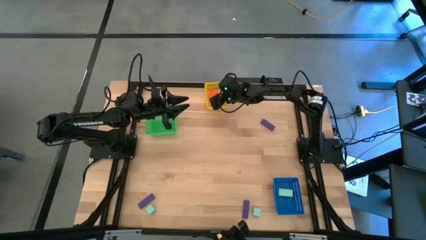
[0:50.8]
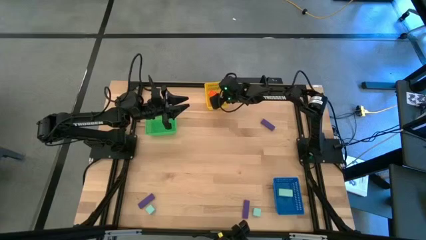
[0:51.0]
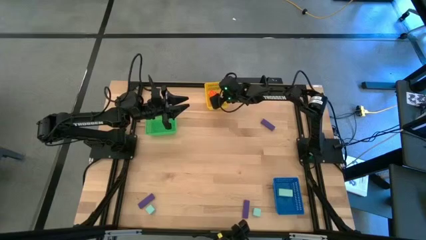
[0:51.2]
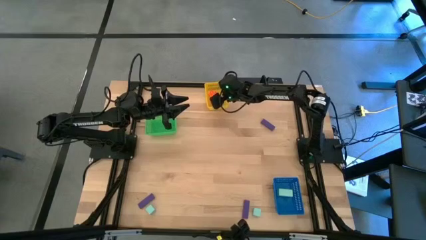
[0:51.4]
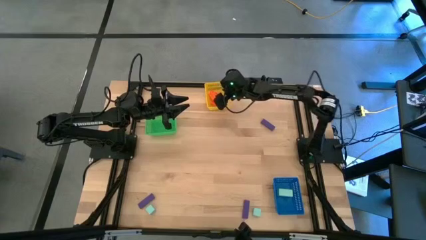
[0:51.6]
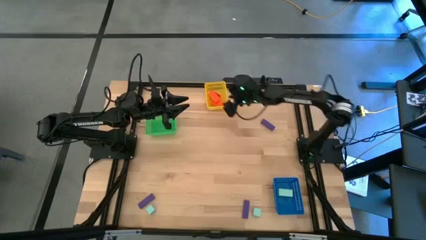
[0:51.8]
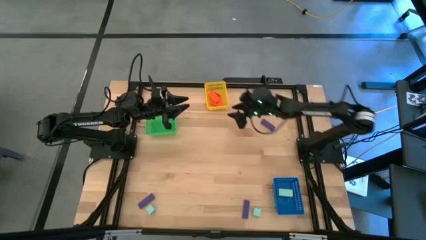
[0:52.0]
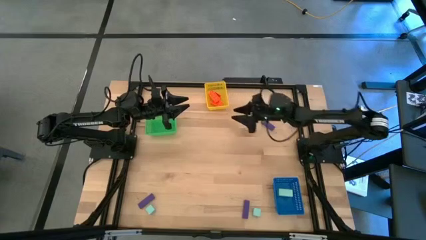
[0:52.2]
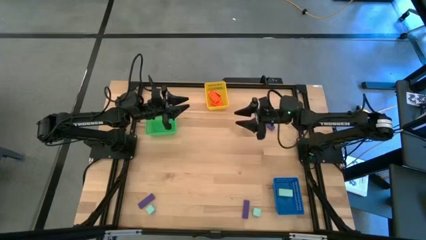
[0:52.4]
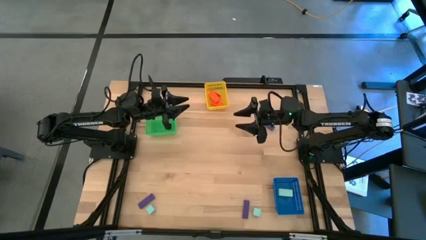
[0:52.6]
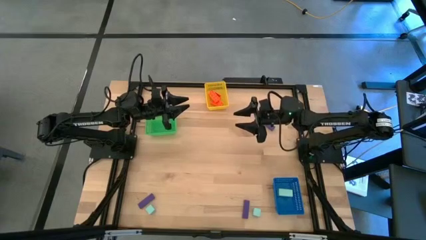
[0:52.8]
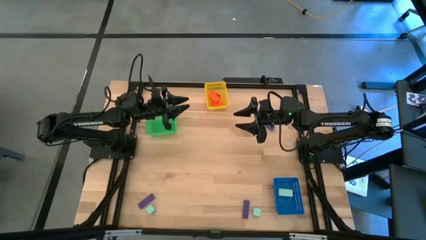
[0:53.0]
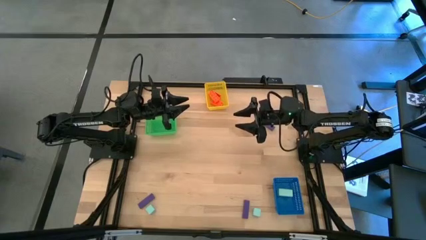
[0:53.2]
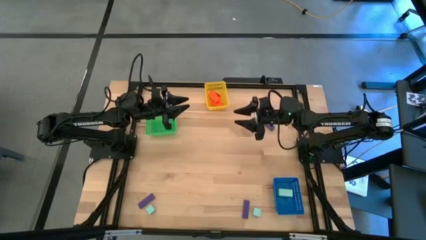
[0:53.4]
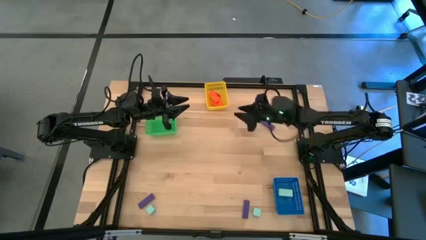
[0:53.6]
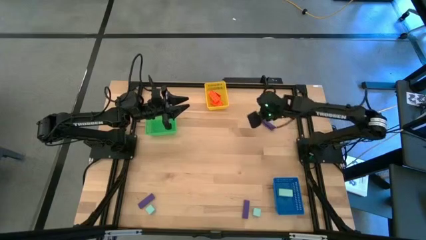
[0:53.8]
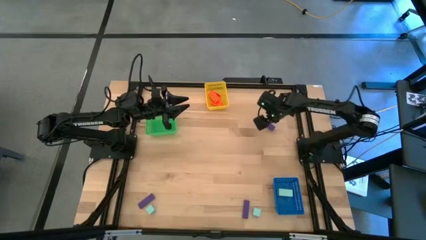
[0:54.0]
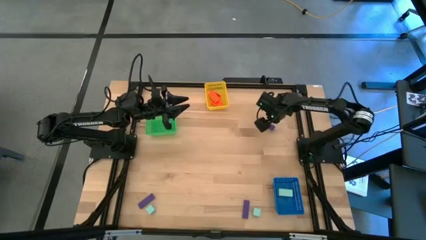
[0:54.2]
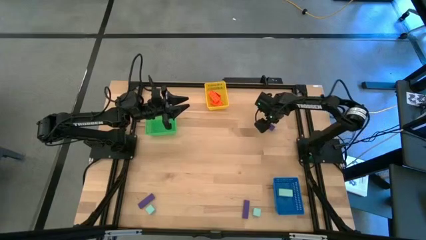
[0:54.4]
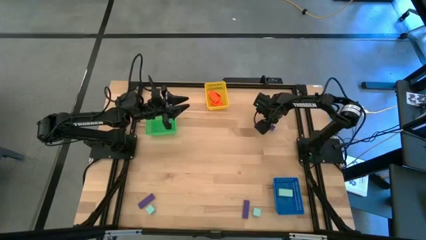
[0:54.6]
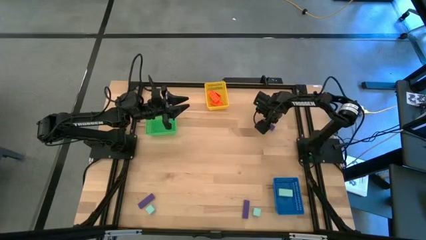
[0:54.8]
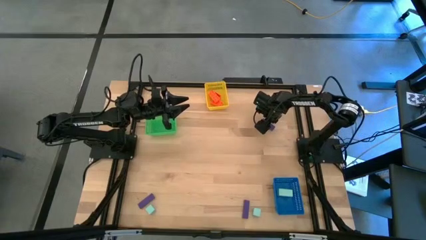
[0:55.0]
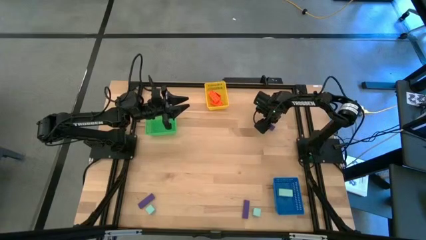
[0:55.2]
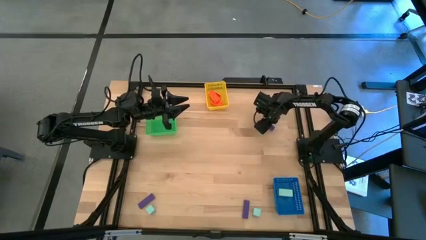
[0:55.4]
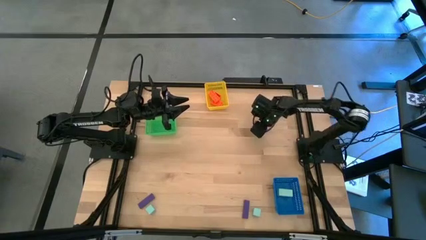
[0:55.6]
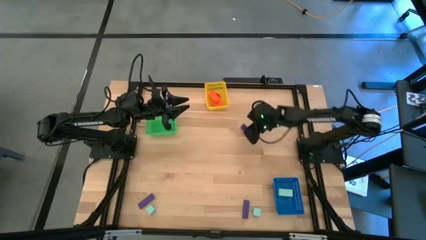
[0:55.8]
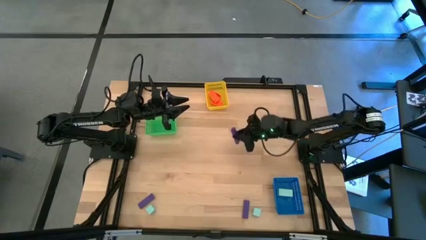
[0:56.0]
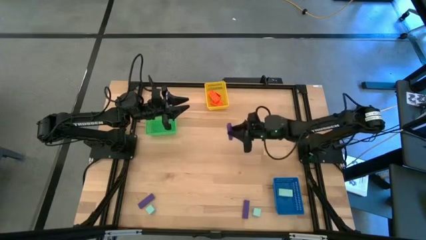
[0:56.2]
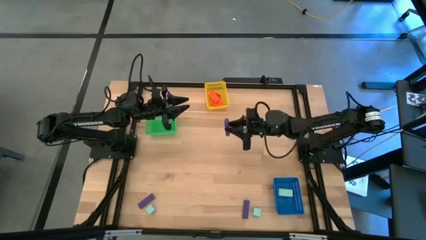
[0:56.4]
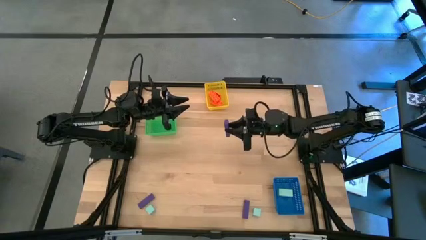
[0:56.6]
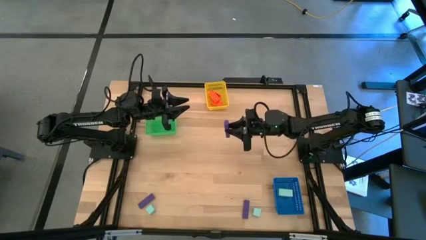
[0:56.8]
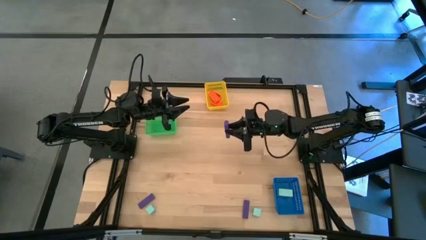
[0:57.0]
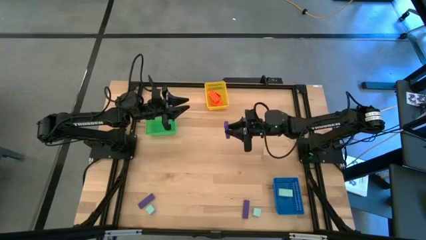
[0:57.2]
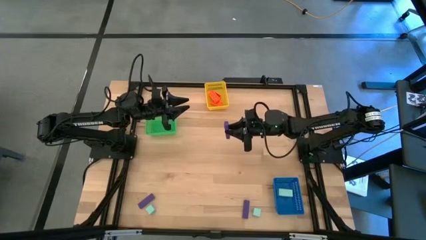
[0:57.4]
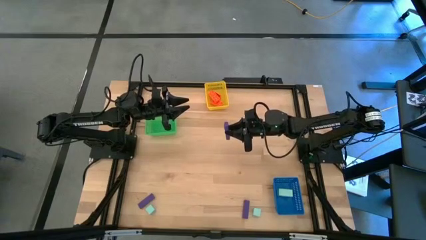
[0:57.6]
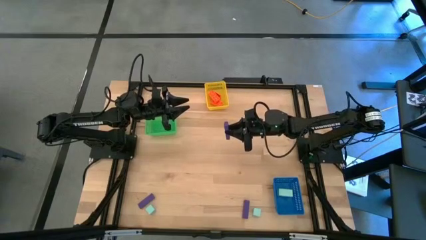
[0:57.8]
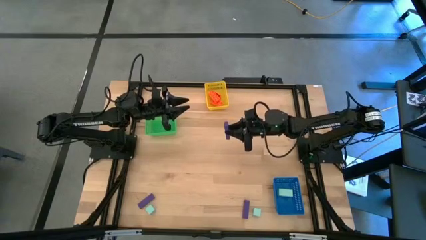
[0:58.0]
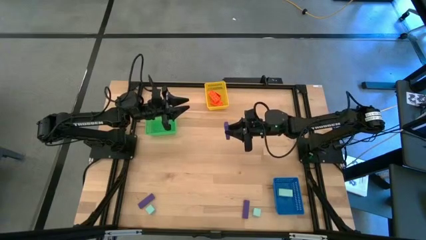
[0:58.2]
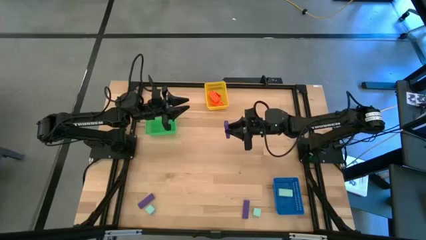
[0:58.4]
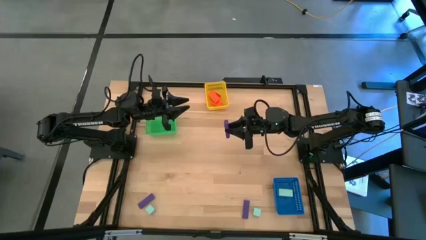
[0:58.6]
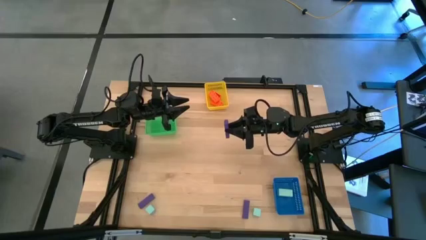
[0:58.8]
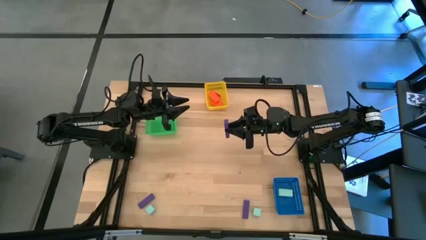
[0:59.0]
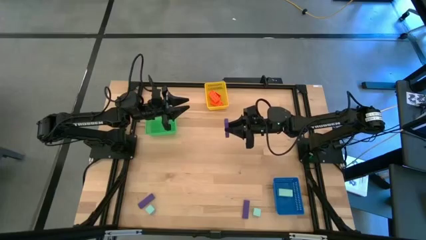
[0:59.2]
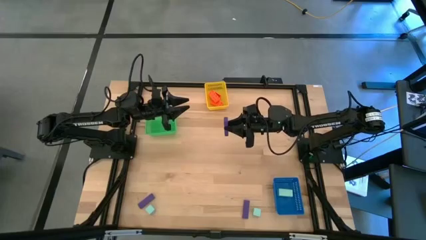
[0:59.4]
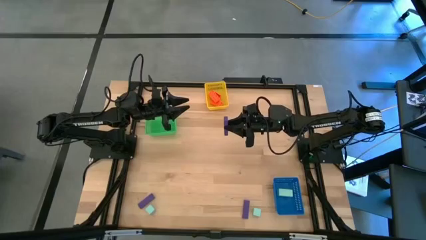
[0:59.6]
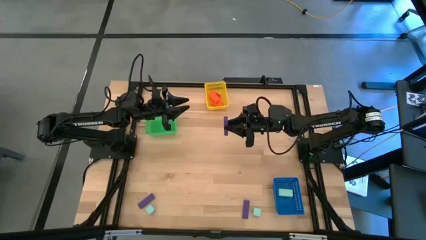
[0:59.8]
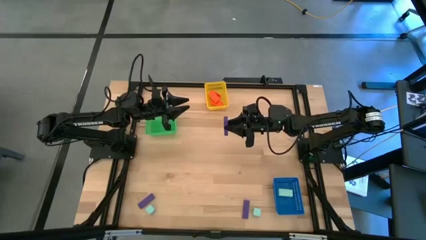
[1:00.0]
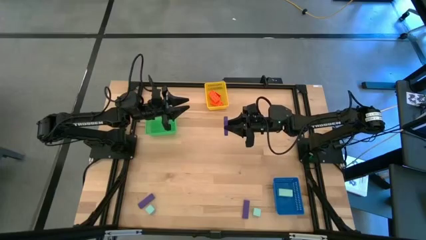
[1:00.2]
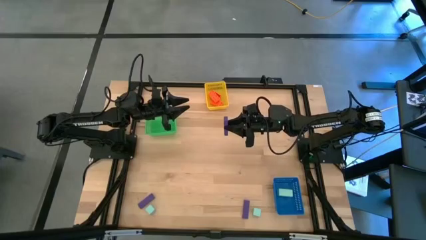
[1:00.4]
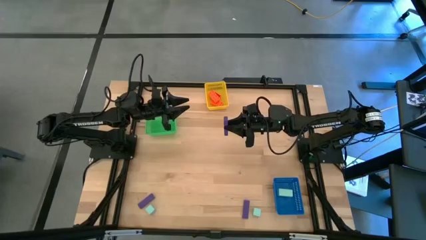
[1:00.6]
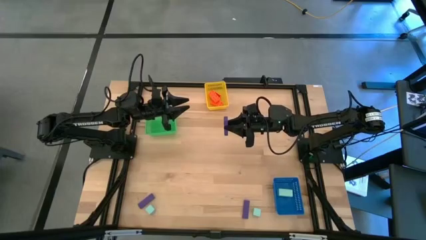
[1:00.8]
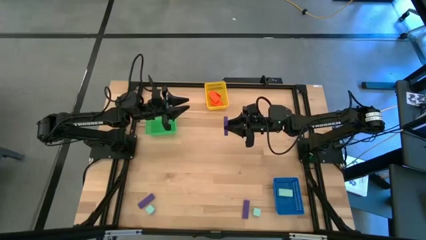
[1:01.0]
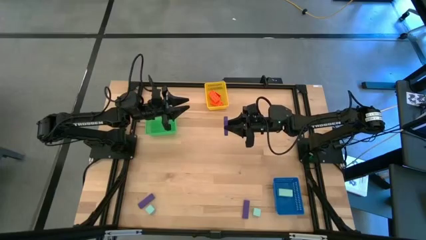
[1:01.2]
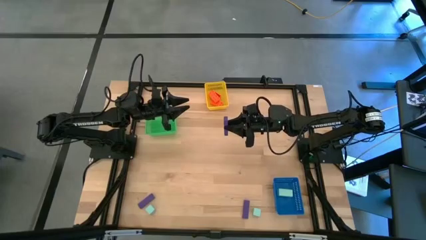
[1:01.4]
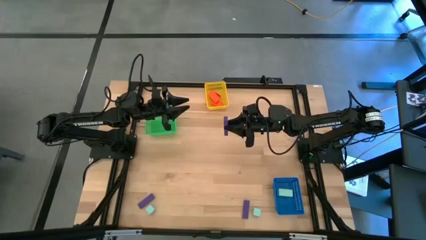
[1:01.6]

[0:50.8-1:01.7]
Task: Sort & place blocks by color
Put the top right violet block into the green bin

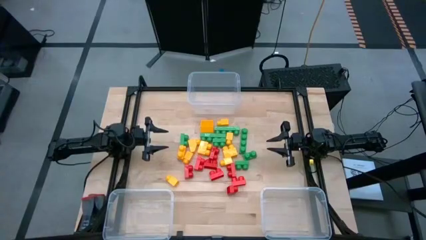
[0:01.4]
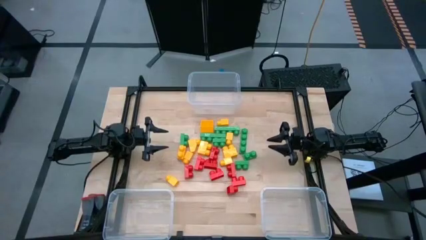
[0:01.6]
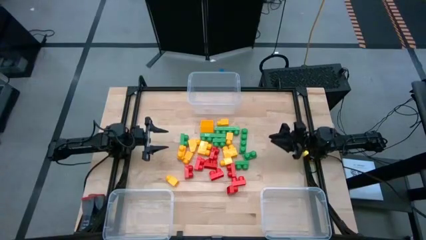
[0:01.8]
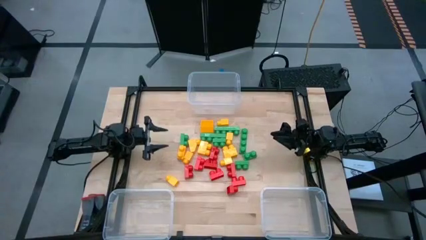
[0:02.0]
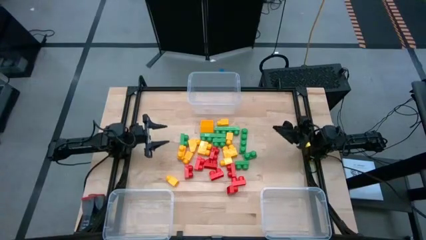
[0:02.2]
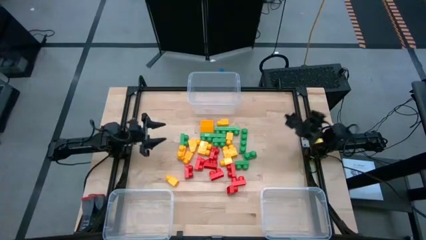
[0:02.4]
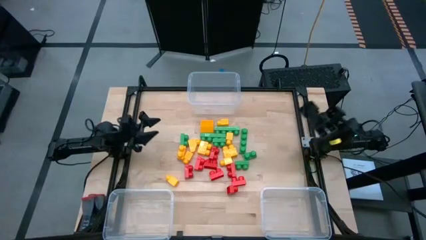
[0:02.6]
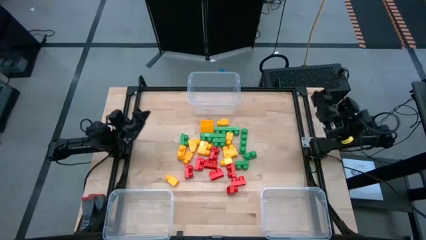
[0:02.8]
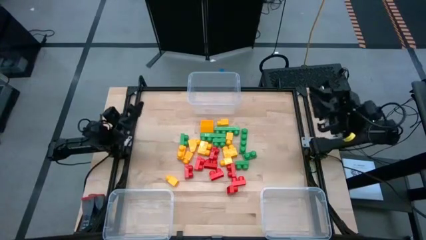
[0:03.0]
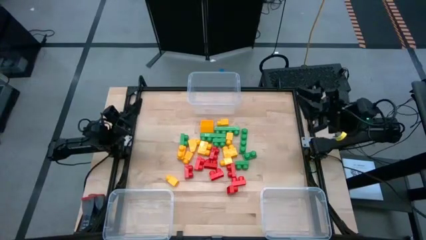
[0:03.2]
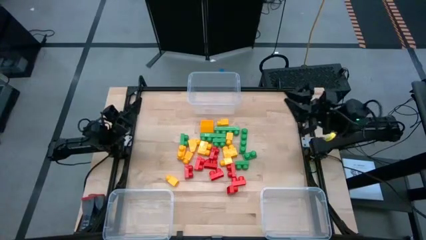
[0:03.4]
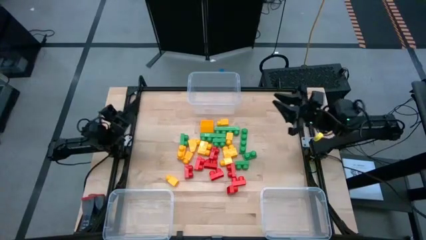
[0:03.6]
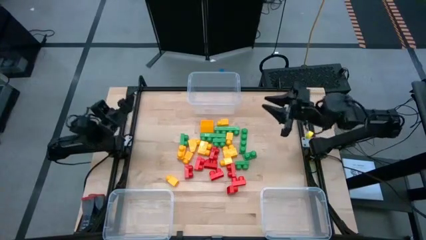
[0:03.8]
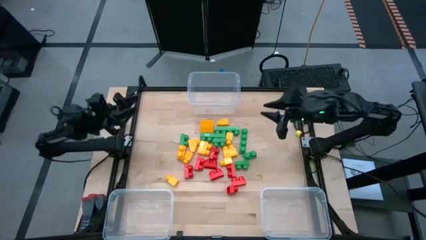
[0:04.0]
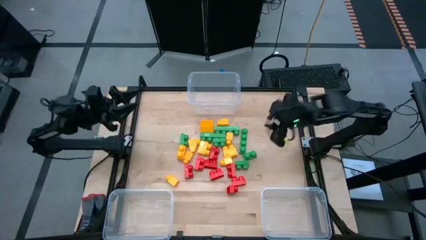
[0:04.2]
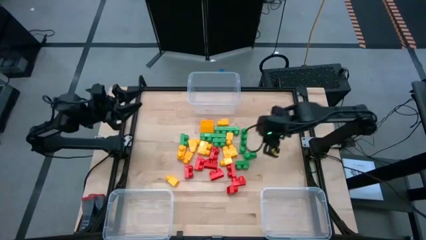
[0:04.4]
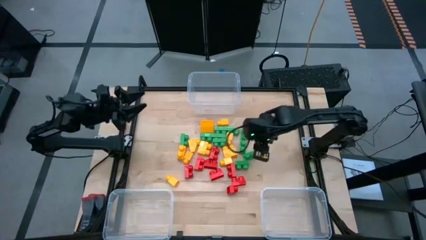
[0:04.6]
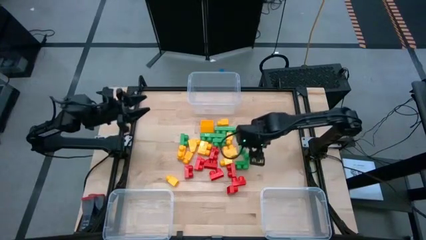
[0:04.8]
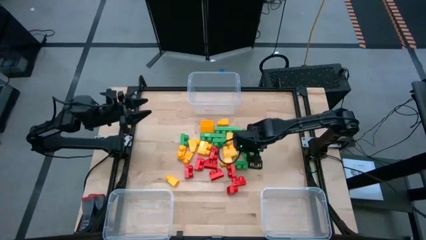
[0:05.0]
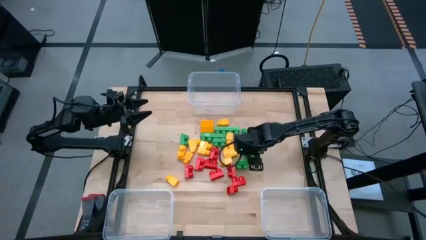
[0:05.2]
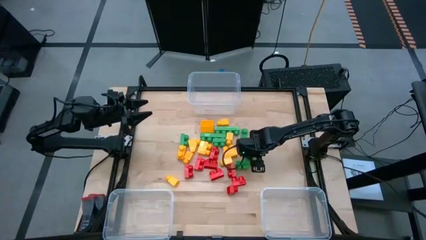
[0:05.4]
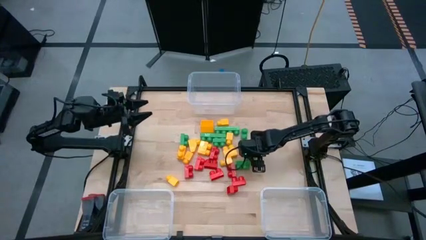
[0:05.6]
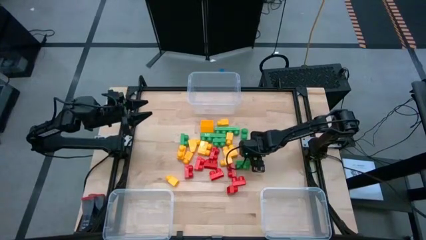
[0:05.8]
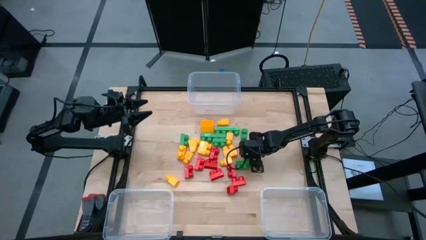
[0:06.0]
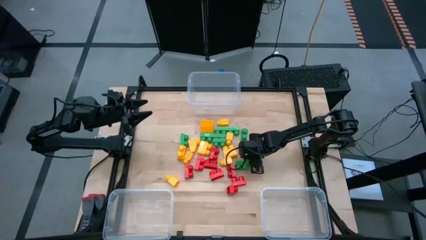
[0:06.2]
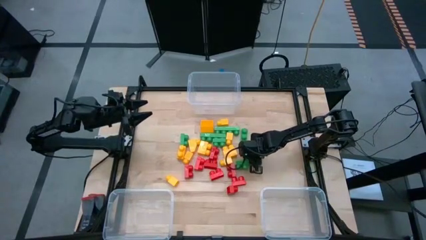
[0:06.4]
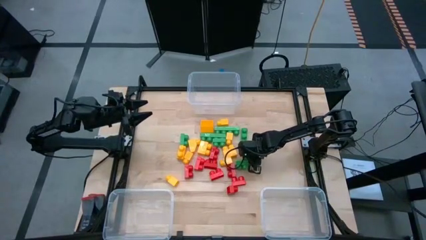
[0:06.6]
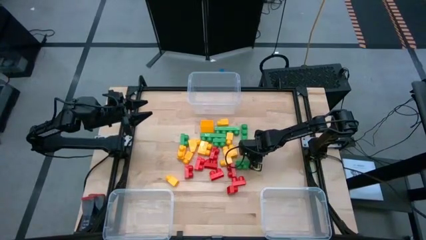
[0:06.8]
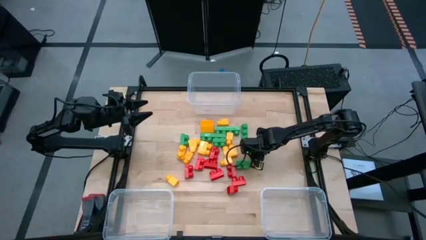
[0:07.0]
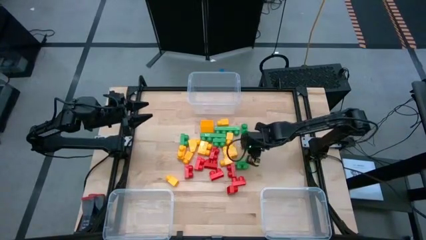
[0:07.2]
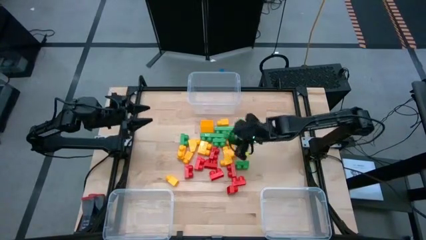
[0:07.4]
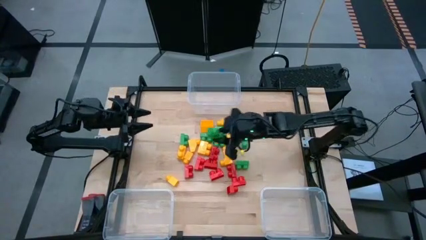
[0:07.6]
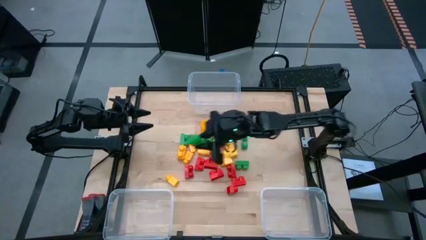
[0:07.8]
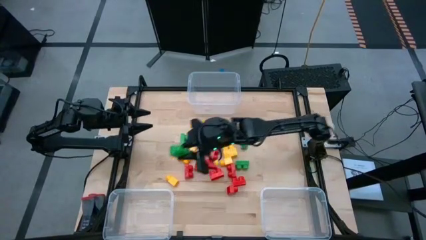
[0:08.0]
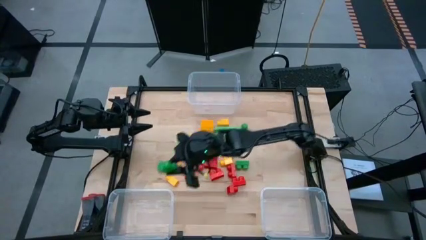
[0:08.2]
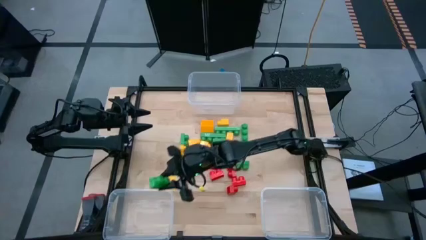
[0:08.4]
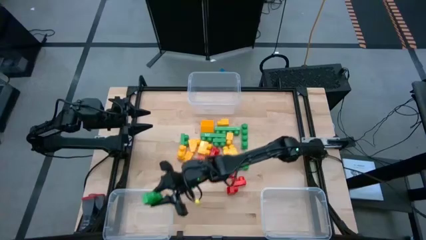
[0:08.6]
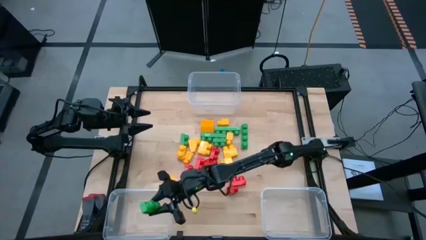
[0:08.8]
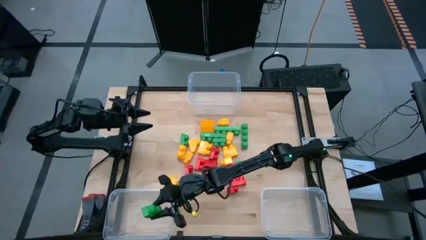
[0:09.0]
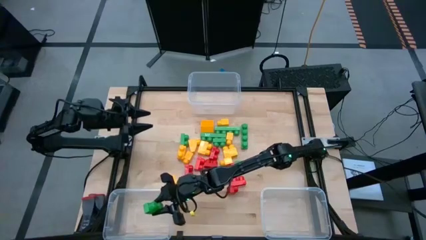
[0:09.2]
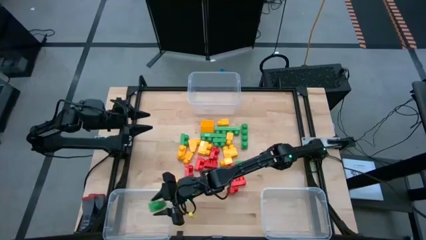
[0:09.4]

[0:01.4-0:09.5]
Task: Sort blocks
Put the green game piece into the bottom left transparent bin
